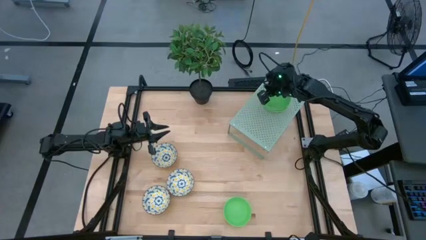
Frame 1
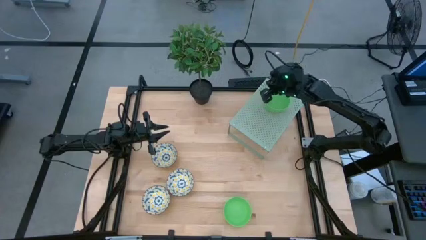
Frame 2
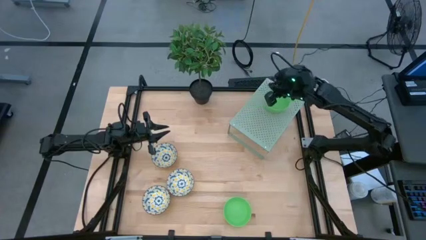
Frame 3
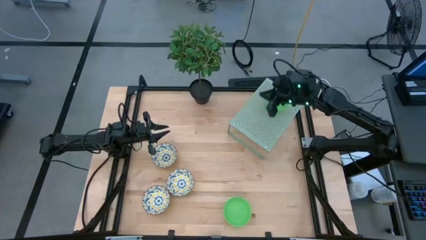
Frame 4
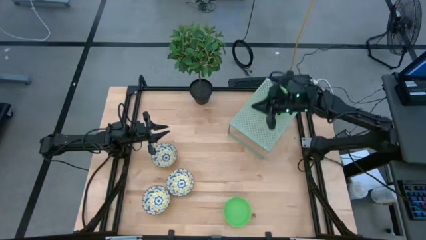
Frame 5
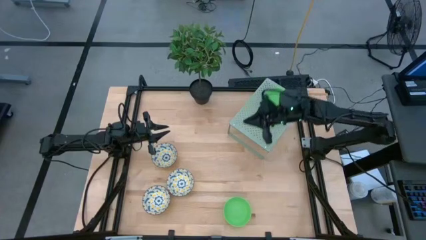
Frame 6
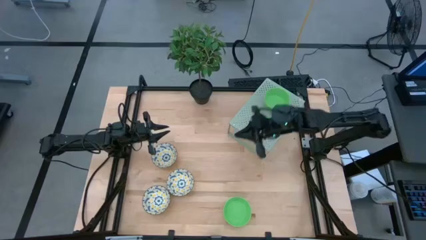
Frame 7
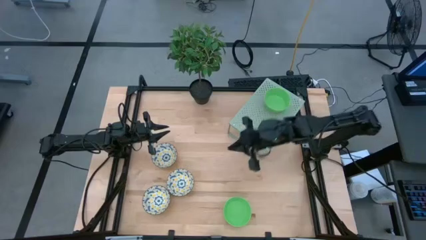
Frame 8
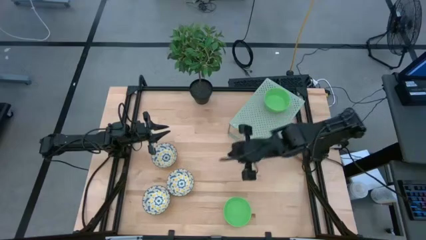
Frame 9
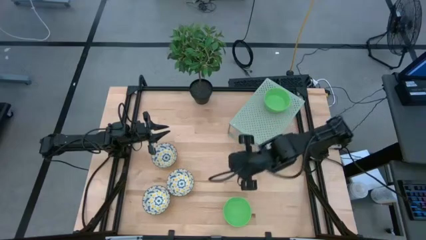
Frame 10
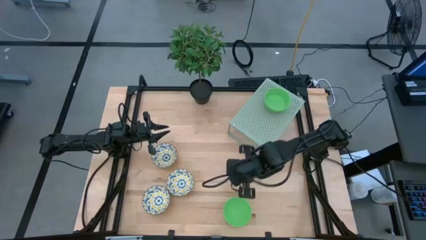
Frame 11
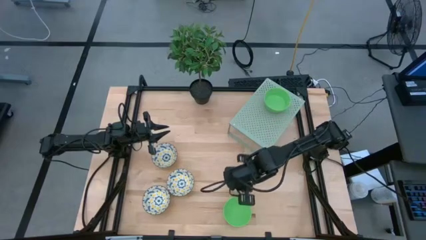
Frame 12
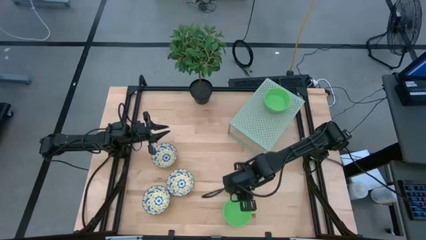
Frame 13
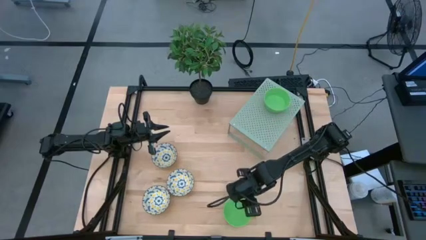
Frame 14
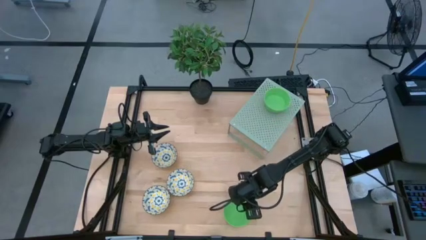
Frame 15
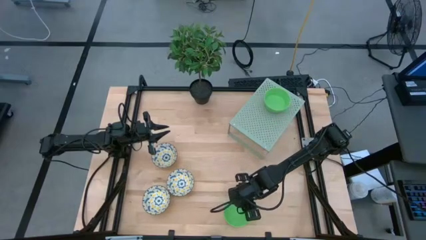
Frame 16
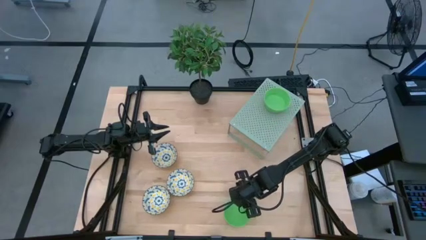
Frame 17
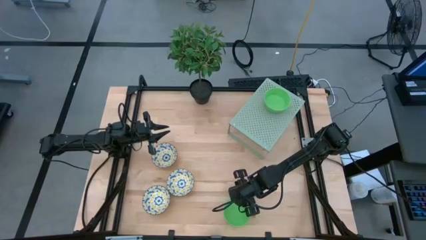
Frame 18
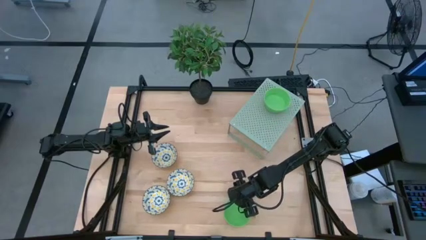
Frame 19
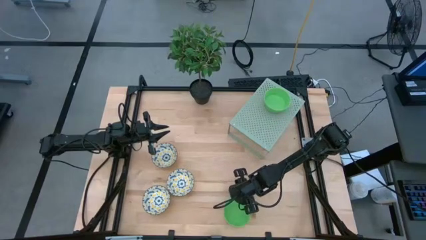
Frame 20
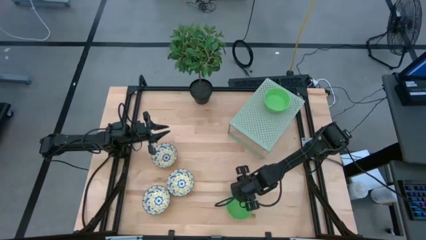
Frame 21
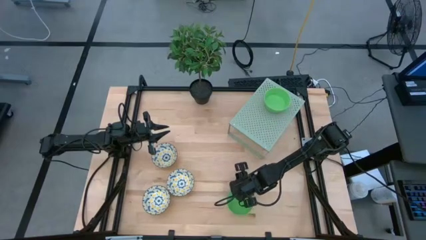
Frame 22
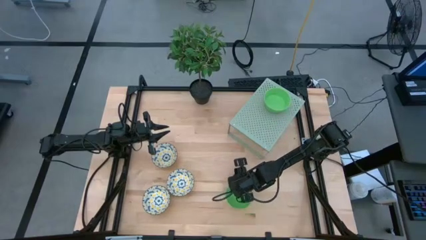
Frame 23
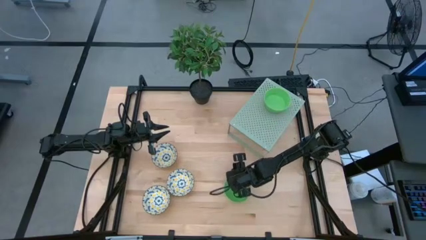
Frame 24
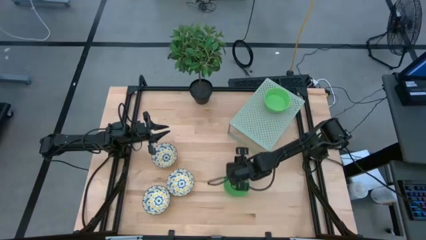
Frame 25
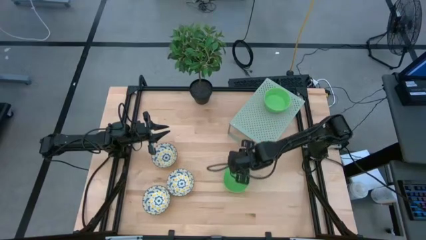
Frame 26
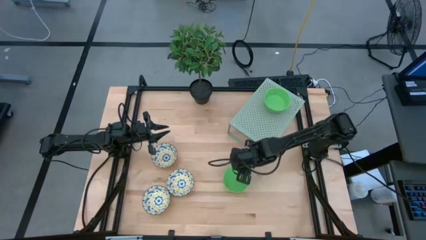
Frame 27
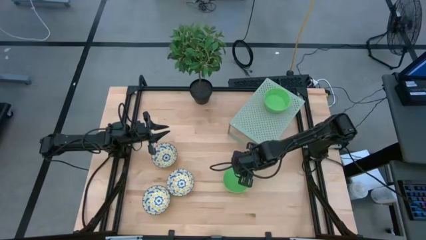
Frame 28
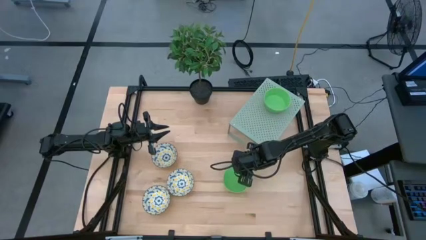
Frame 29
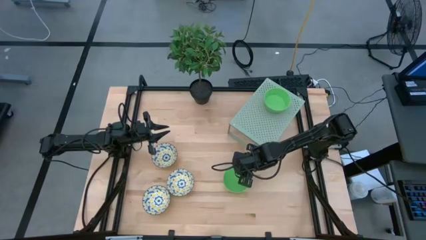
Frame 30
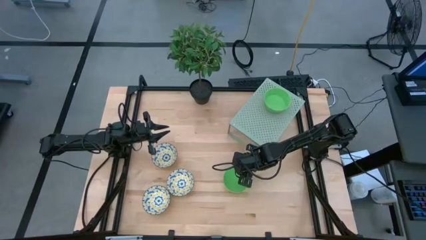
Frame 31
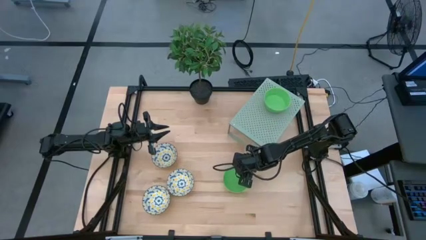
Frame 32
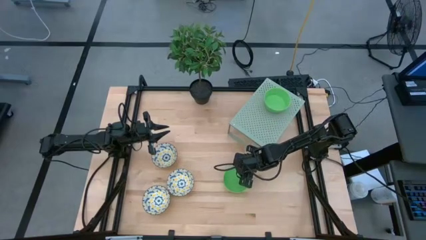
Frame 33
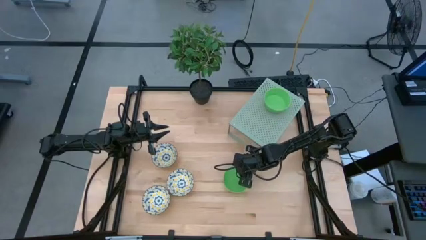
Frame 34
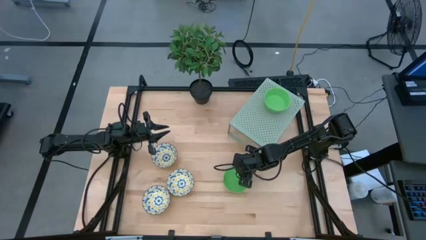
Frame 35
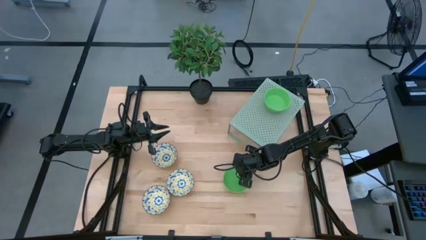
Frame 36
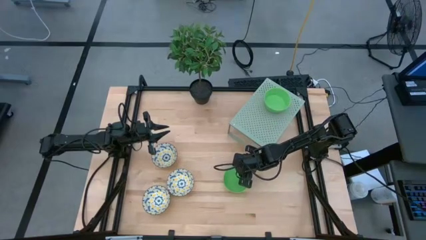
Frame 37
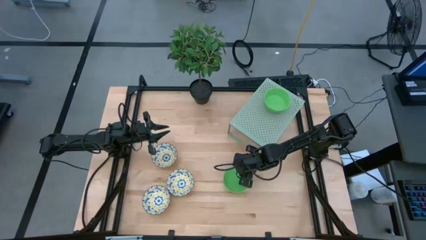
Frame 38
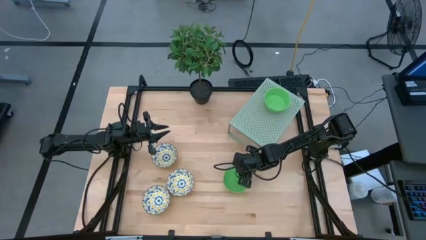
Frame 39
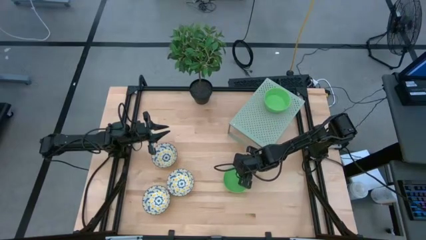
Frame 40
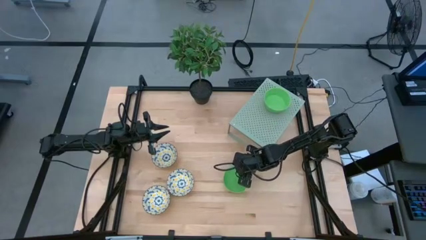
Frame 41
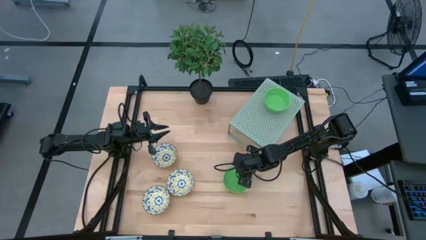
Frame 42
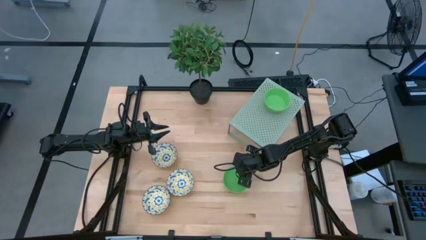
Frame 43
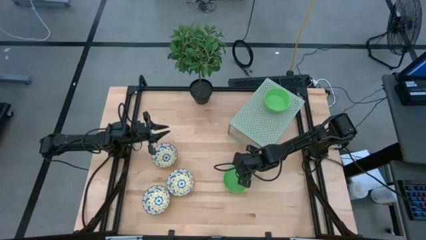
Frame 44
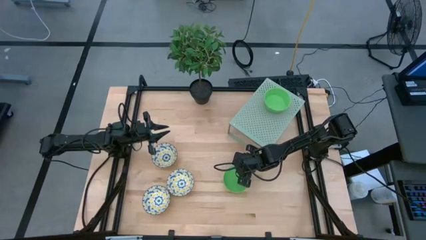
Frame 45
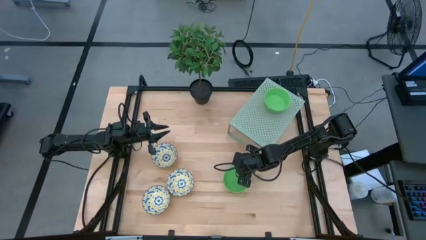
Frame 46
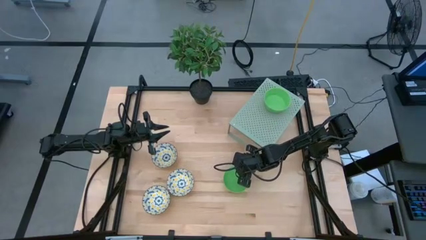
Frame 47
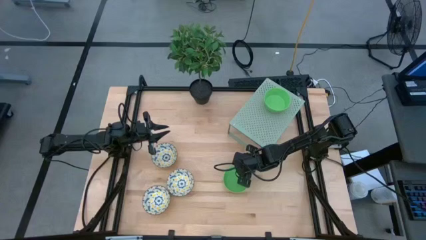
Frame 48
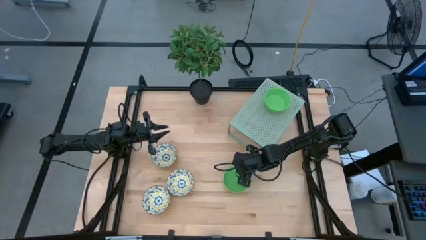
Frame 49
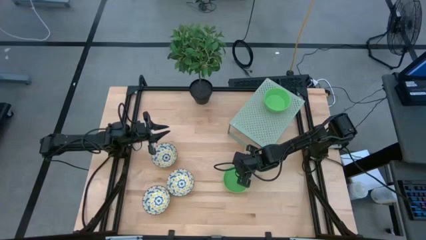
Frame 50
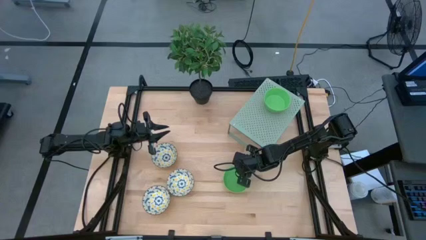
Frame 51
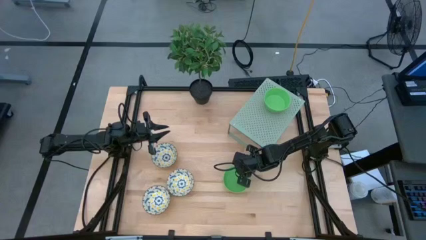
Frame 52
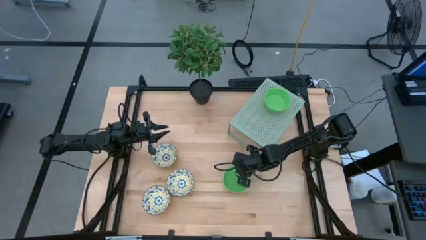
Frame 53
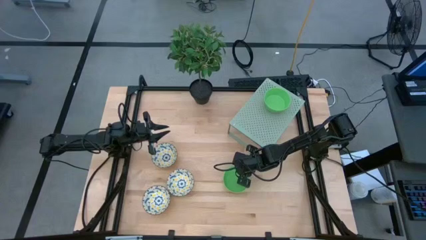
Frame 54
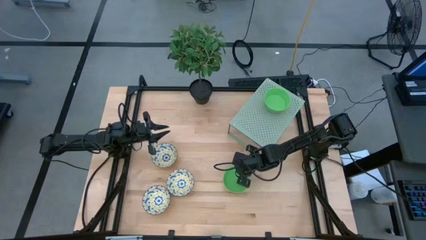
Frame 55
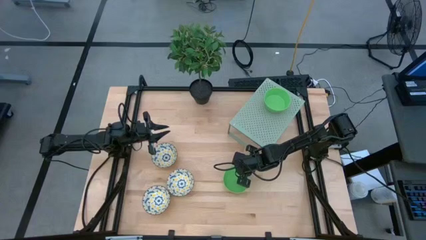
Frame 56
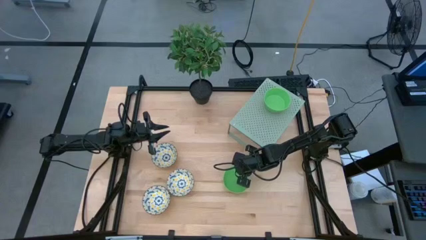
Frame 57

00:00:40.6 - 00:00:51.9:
Task: Pick & Place Mini bowls
Stack the green bowl on the green bowls on the shelf
